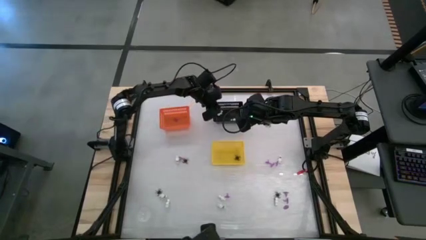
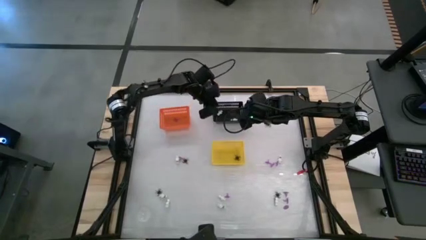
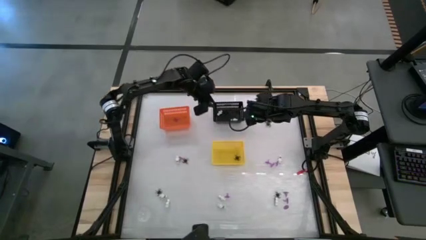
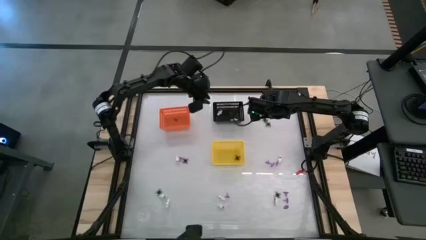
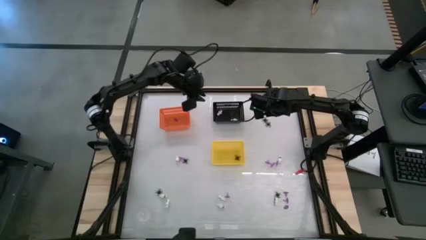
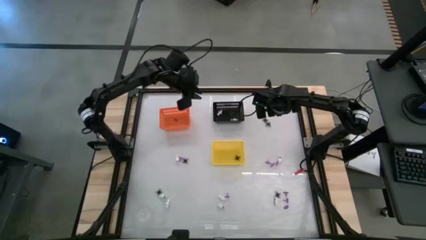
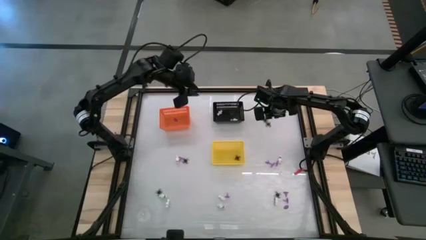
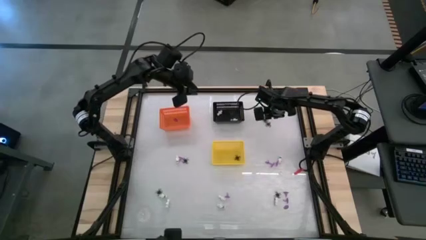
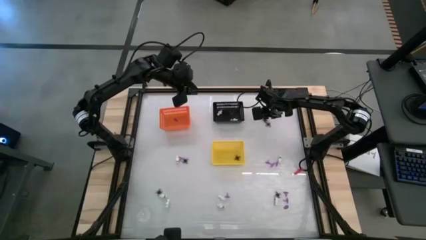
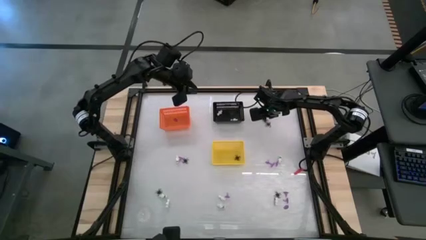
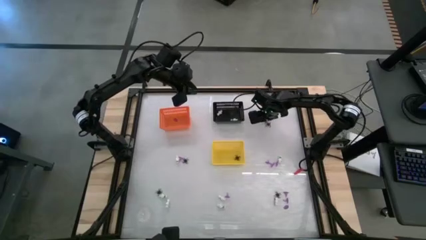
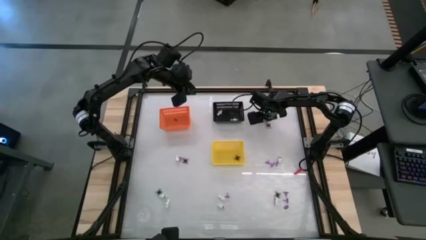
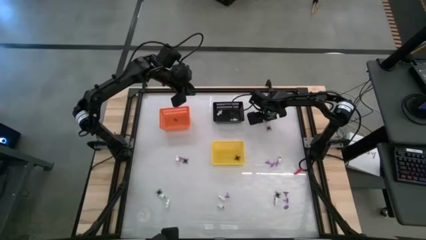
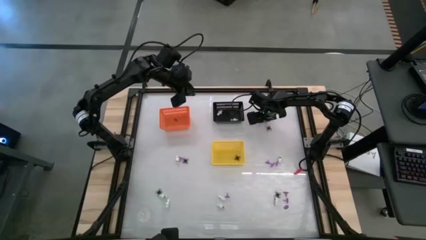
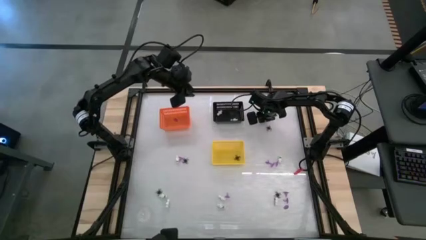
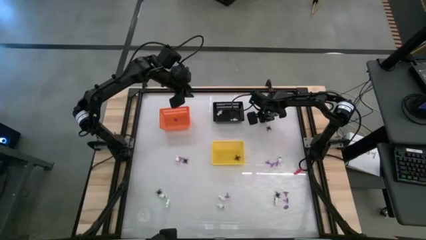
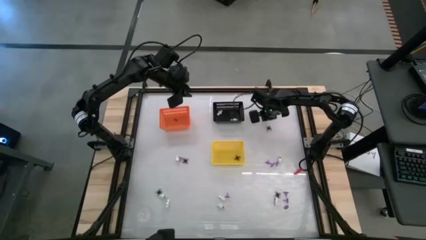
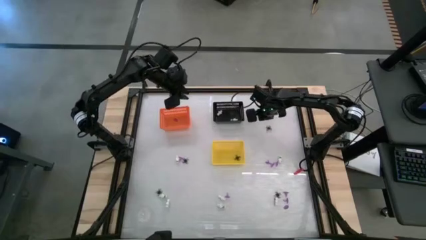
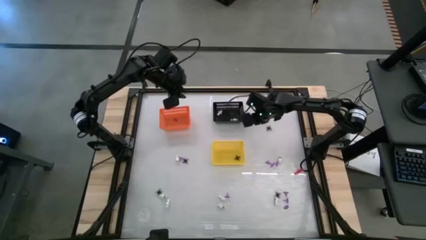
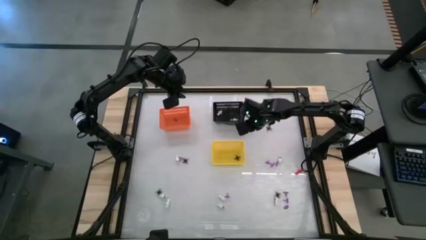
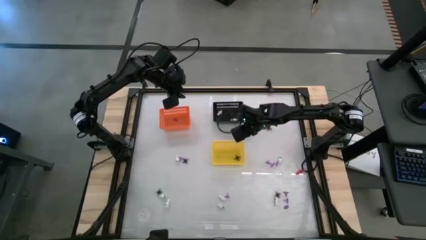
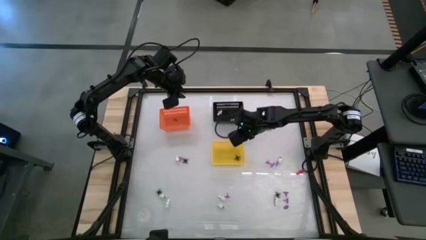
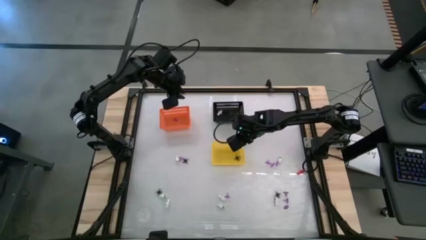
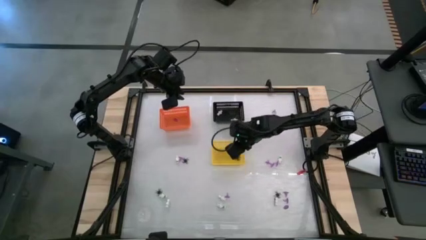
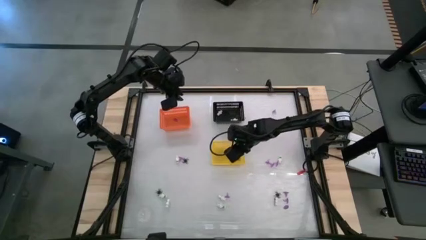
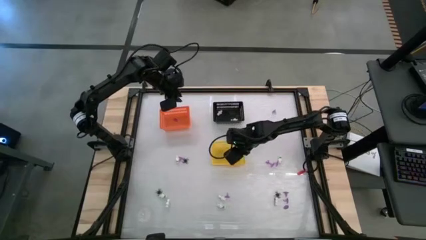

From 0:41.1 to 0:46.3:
Task: Sort Halloween decoration
Put the black spider toy into the yellow bin

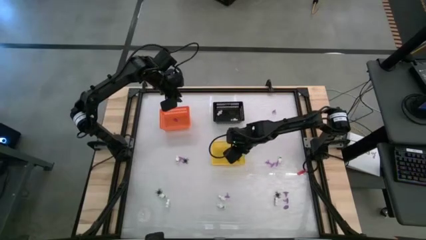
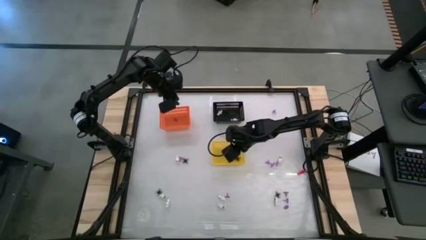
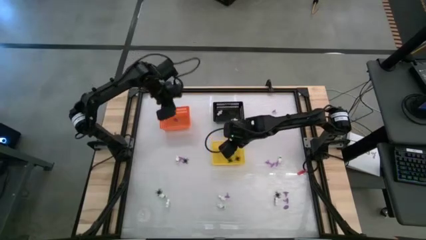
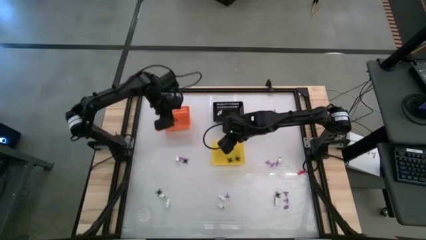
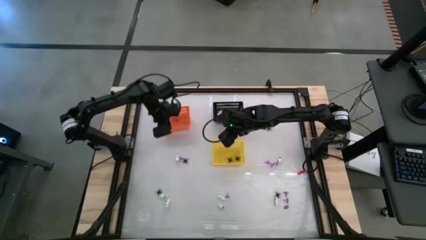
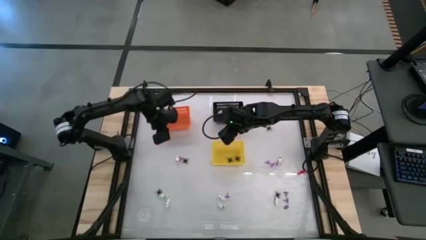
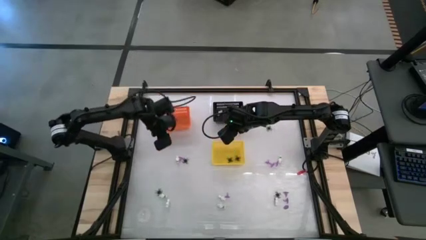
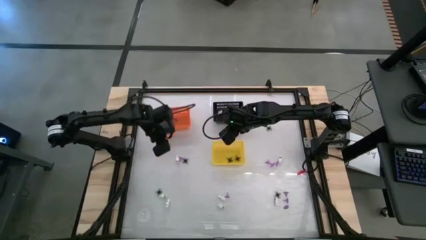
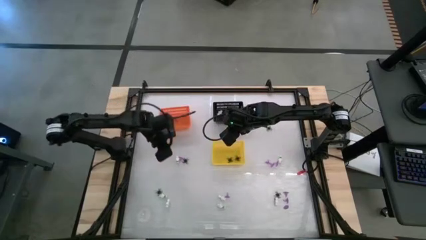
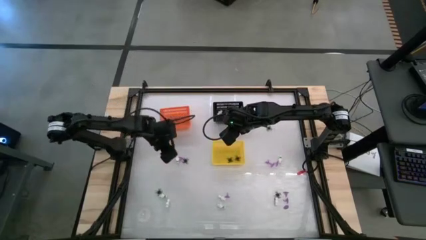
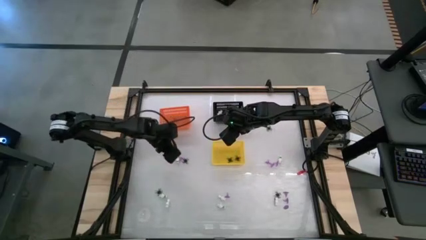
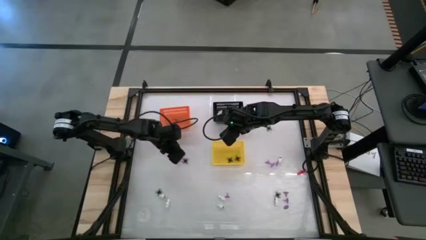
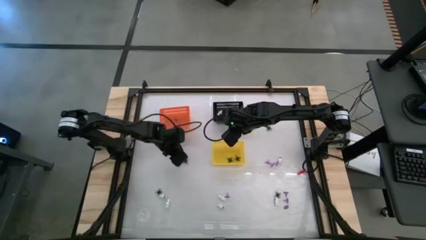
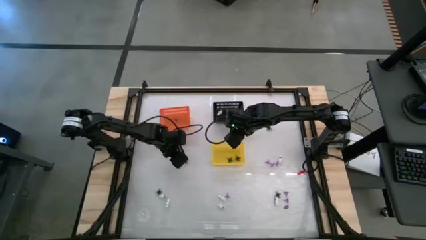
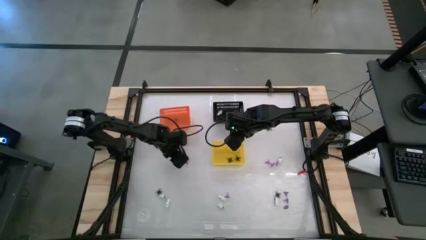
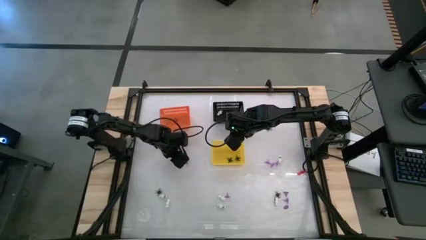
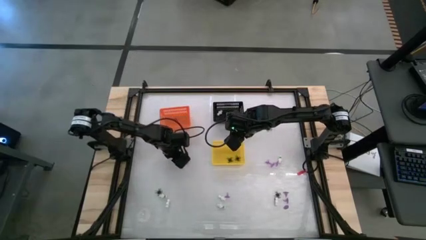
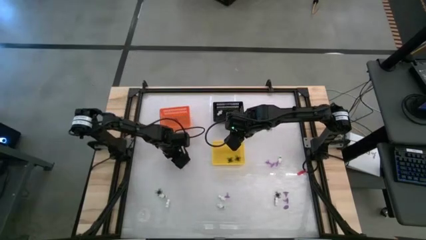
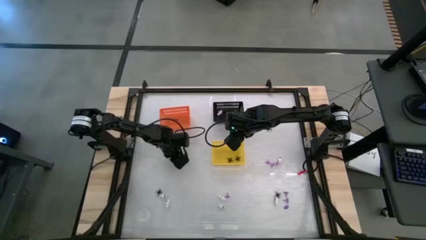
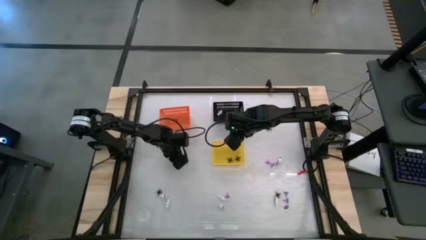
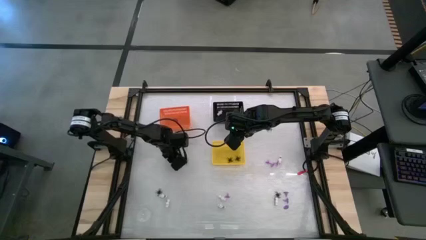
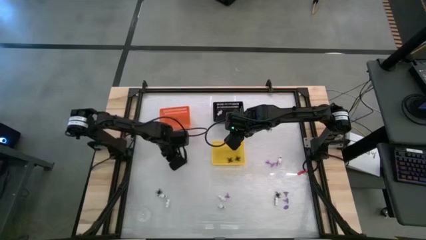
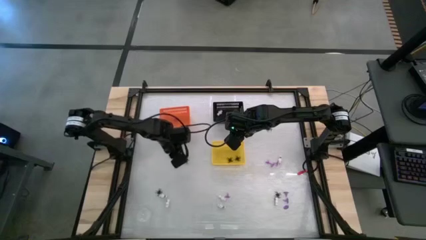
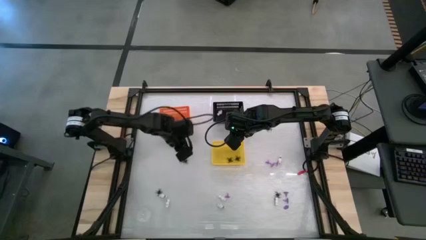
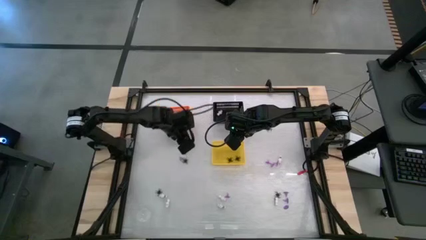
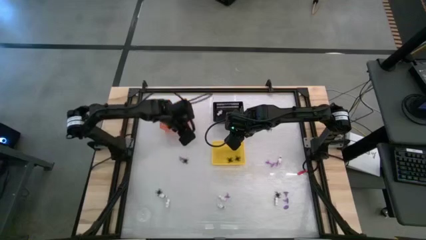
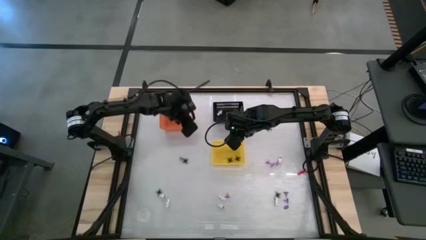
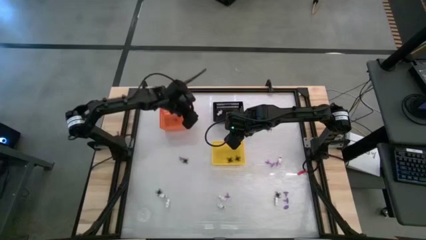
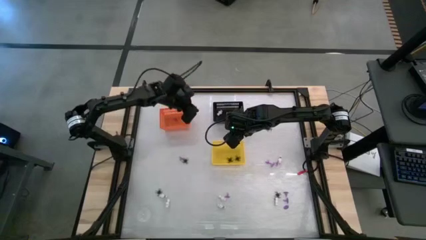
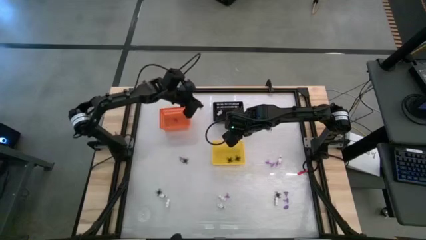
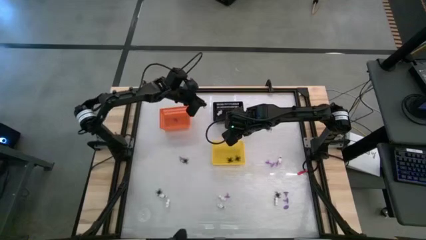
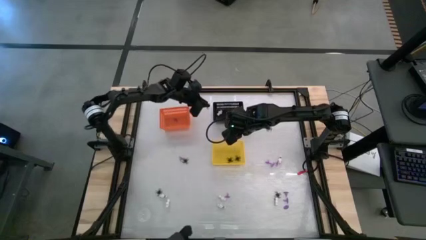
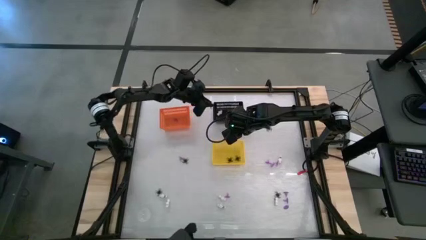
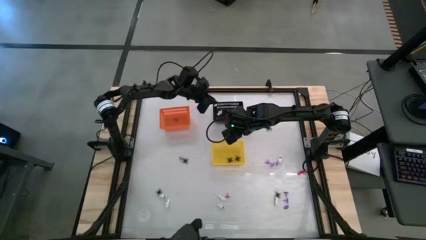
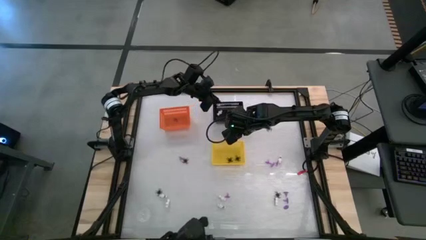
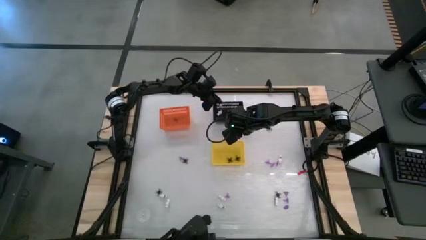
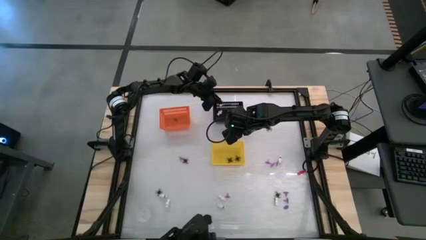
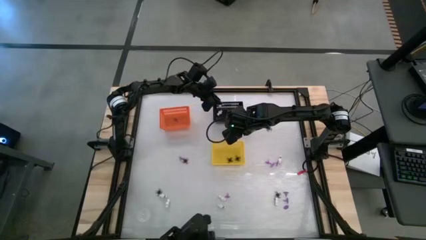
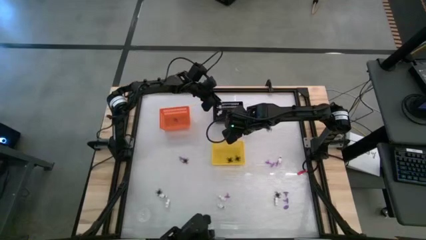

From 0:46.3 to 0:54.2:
Put the white skeleton toy into the black bin

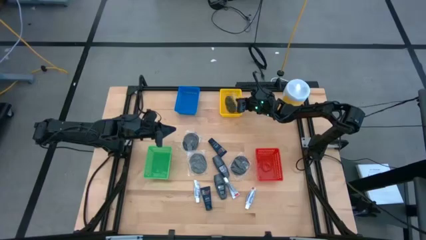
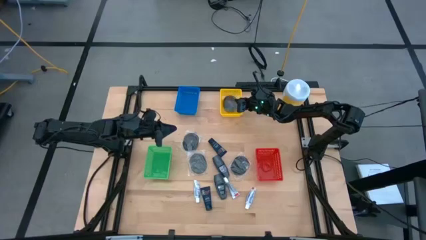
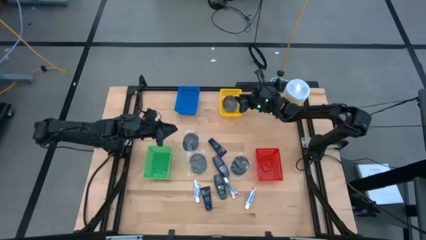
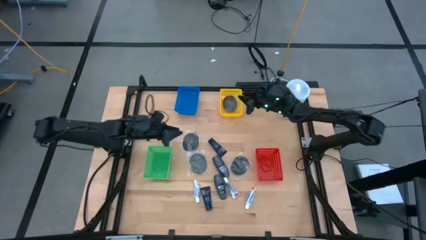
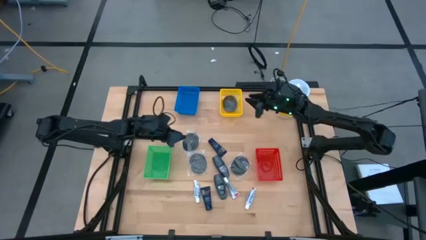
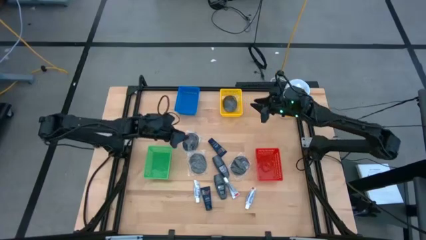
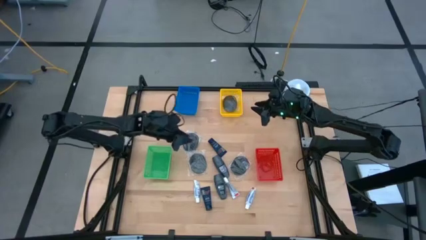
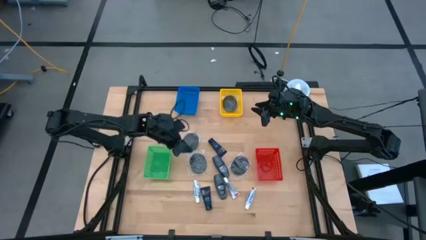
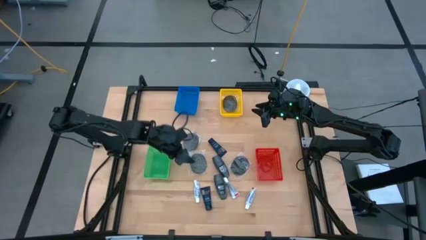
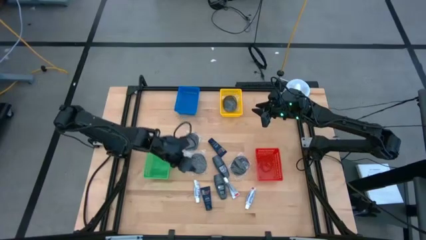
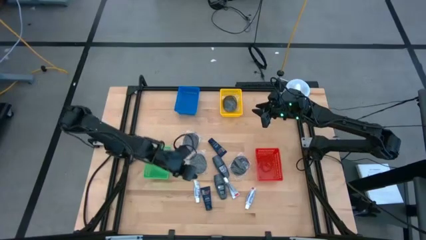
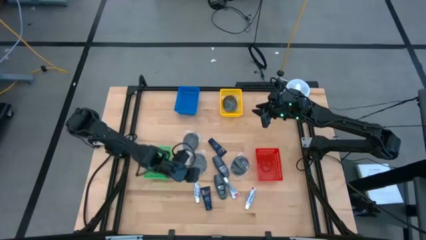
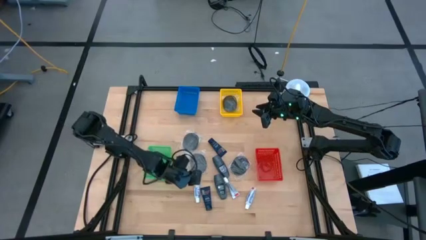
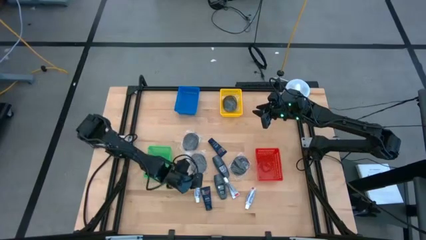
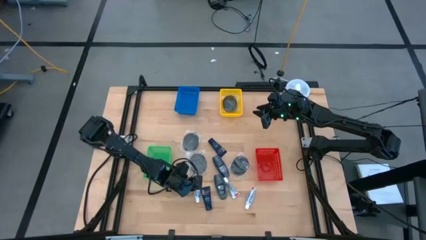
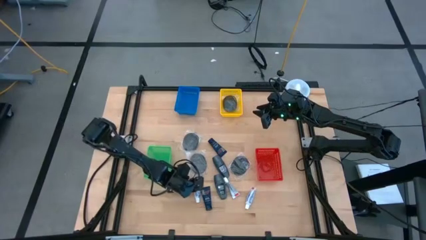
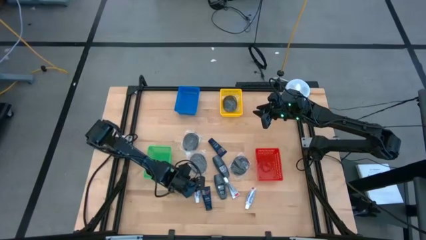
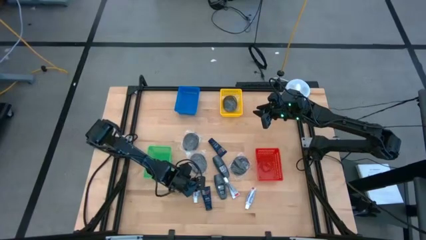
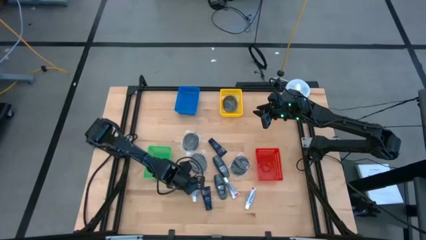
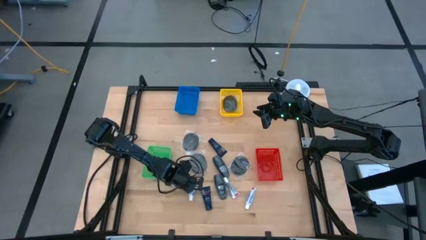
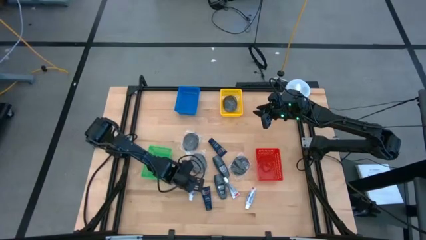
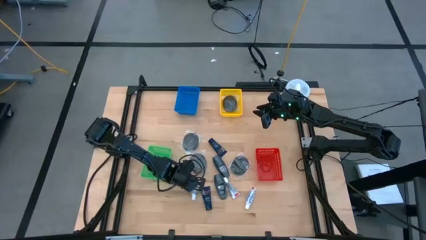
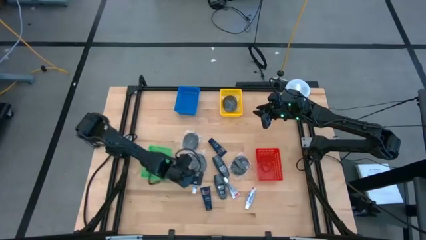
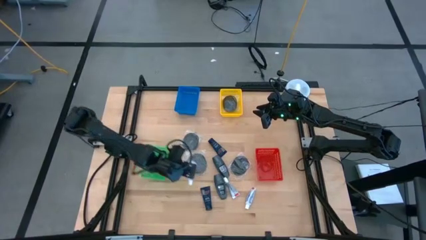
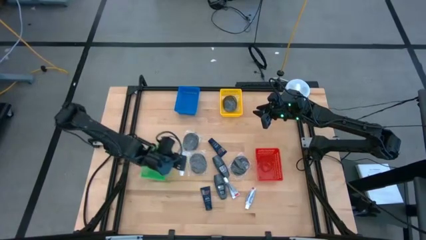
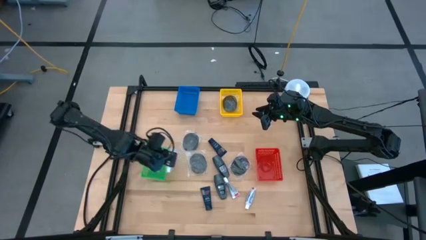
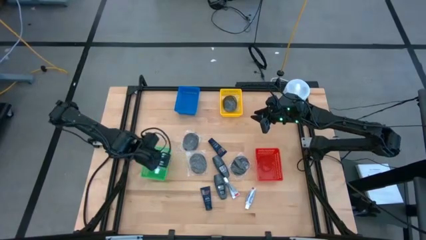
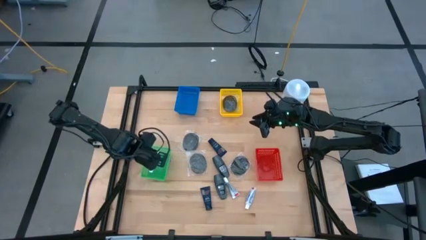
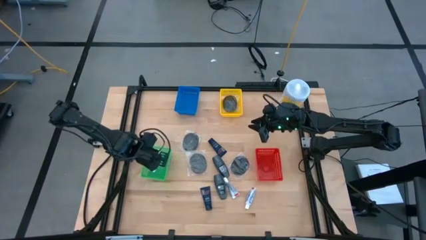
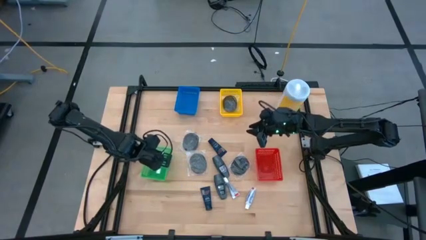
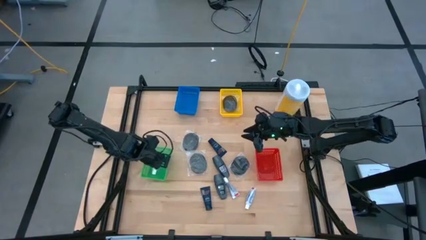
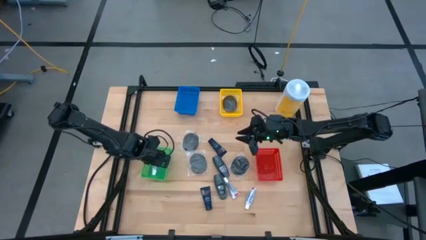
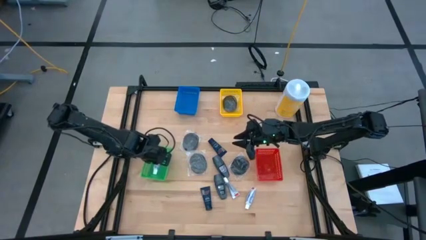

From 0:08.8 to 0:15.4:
Task: Pick & Place Travel size toiletries
Put the white toothpaste into the green bin
